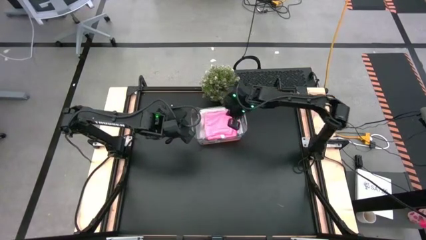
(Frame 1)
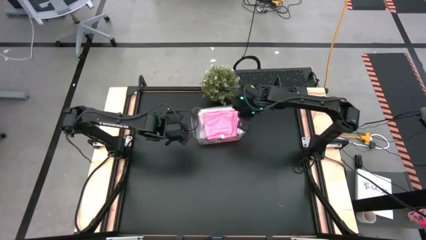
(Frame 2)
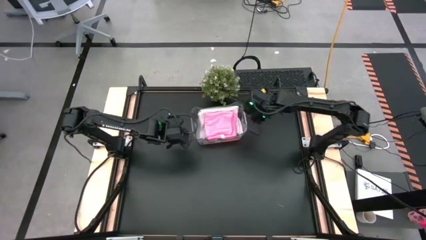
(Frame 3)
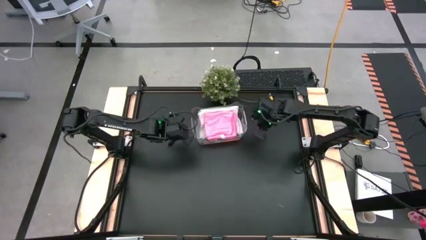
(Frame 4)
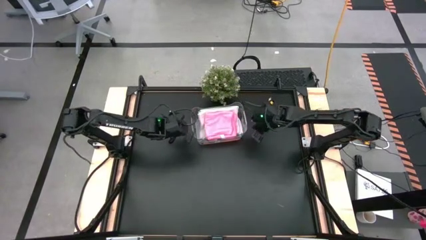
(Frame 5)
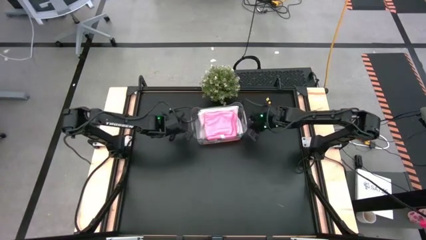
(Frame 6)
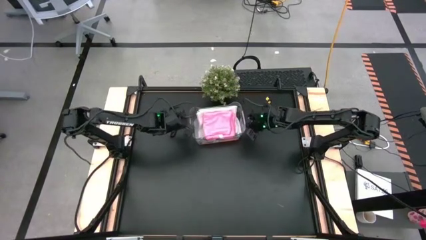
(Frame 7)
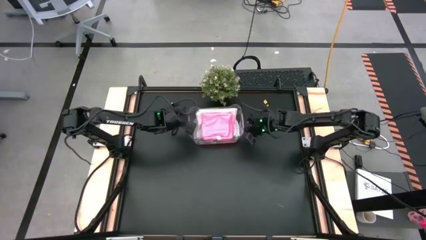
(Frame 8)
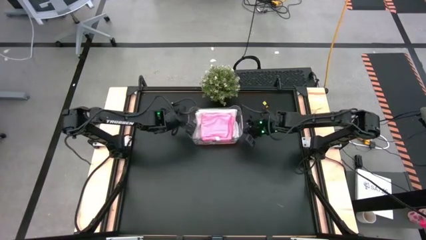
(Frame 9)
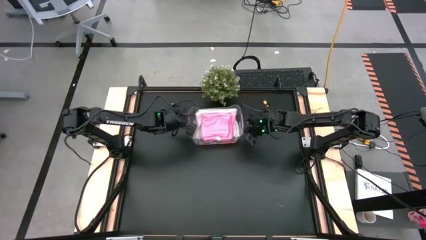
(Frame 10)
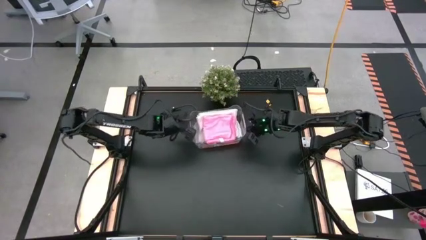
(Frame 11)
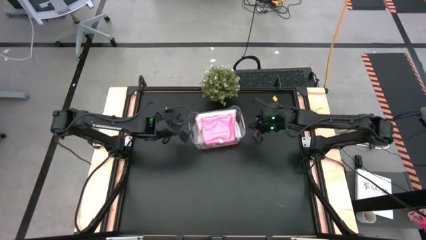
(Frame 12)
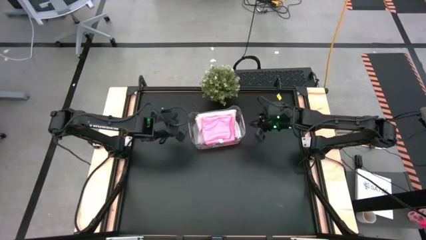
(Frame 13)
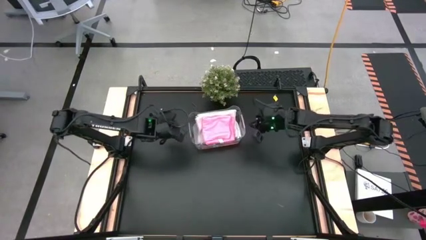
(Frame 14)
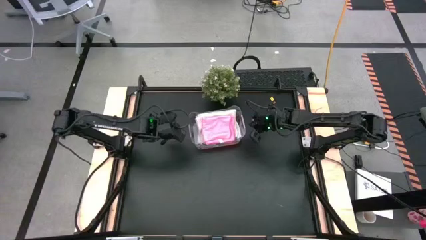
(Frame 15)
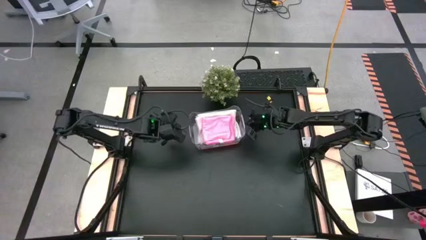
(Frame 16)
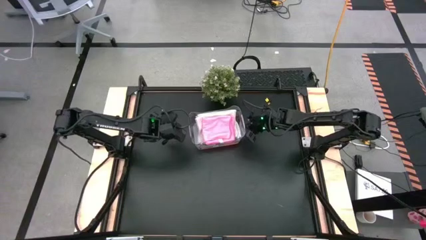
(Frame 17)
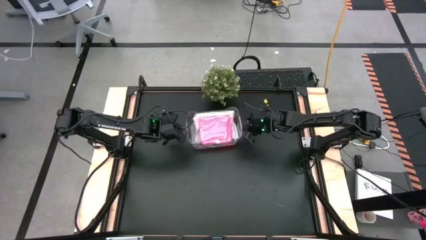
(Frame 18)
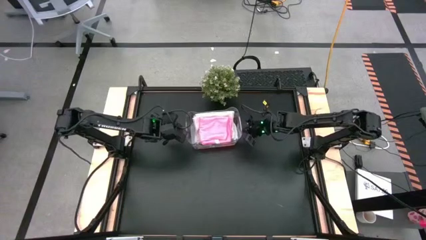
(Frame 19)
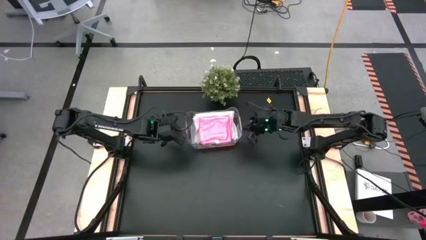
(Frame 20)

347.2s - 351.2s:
Task: Fold microfiber towels
Adjust the transparent bin

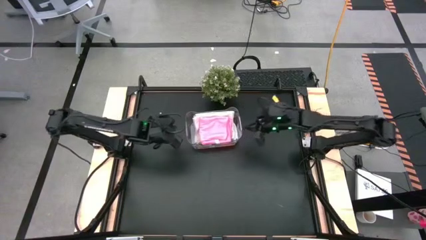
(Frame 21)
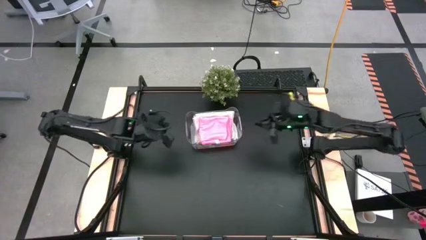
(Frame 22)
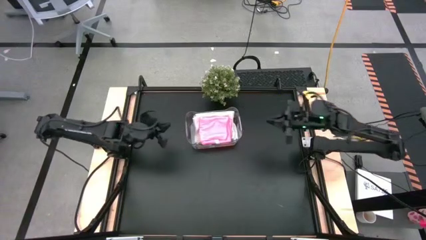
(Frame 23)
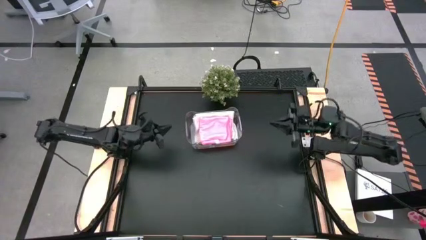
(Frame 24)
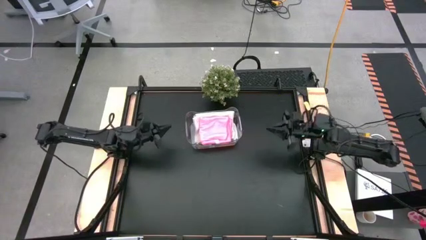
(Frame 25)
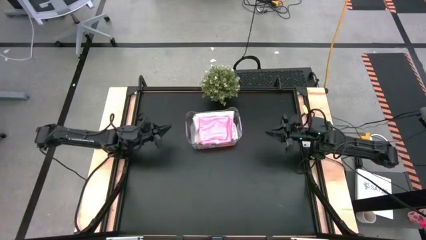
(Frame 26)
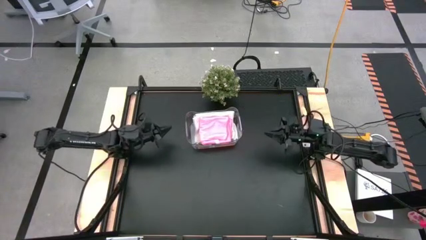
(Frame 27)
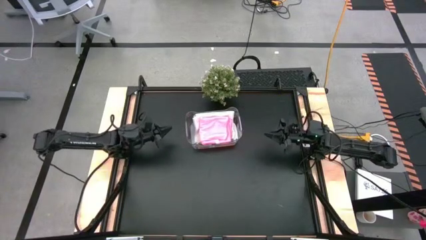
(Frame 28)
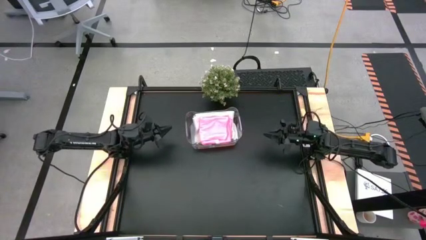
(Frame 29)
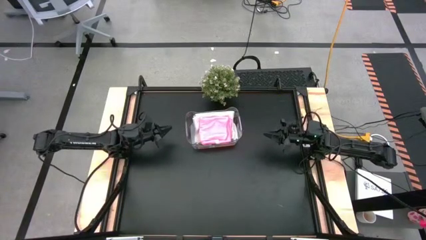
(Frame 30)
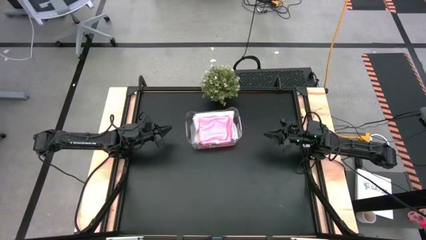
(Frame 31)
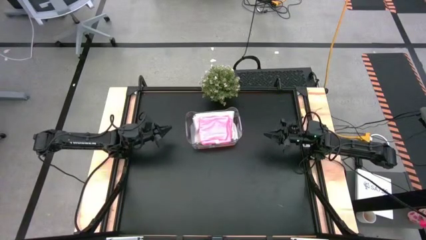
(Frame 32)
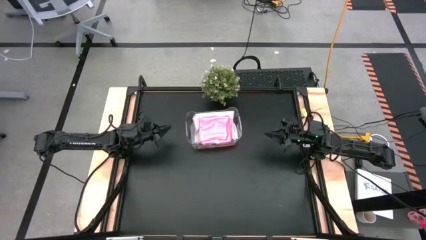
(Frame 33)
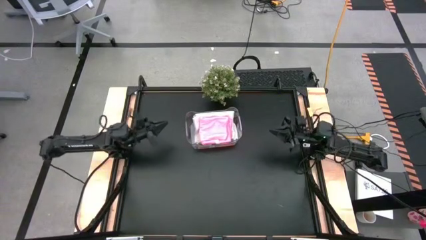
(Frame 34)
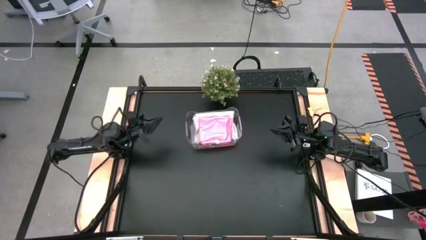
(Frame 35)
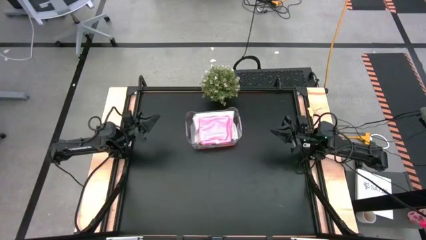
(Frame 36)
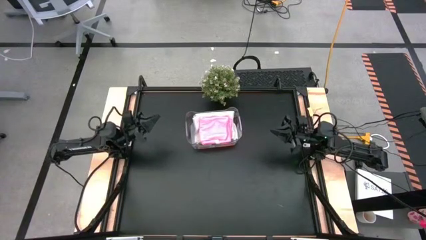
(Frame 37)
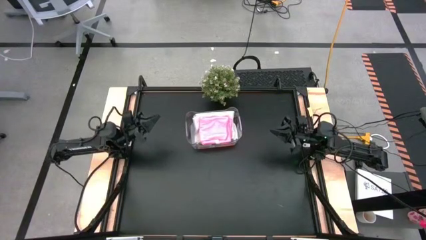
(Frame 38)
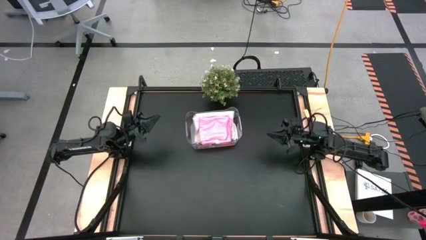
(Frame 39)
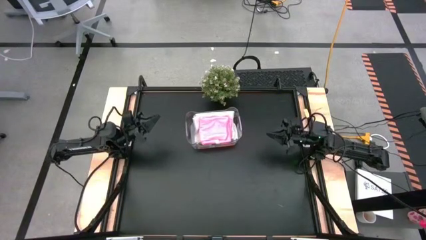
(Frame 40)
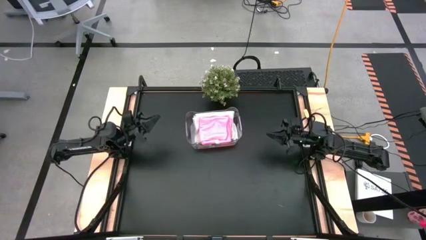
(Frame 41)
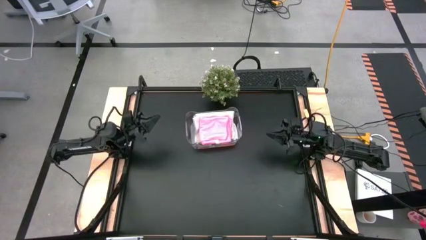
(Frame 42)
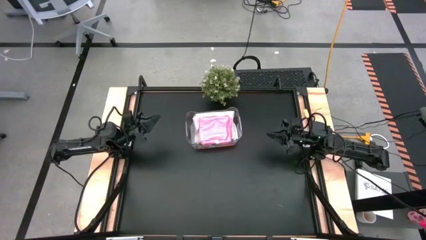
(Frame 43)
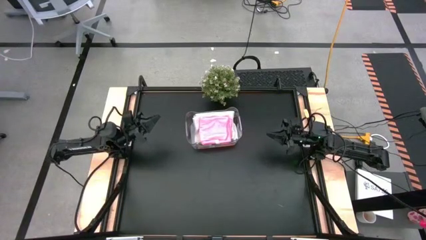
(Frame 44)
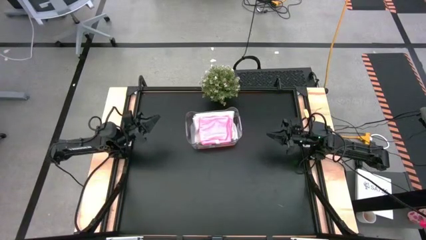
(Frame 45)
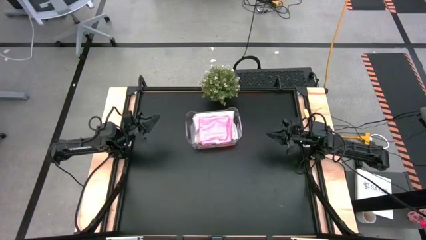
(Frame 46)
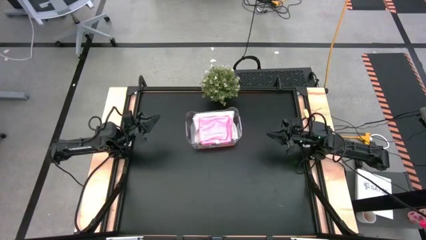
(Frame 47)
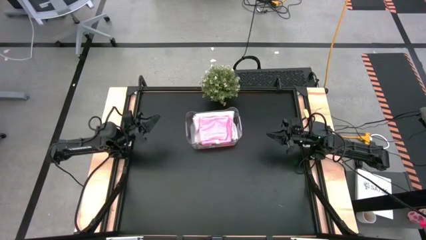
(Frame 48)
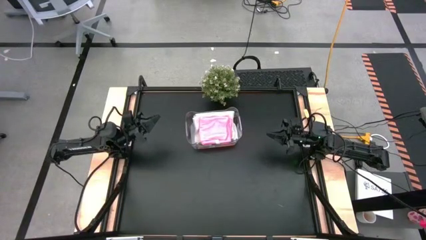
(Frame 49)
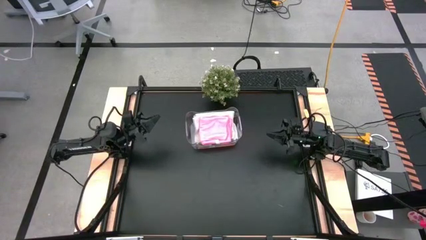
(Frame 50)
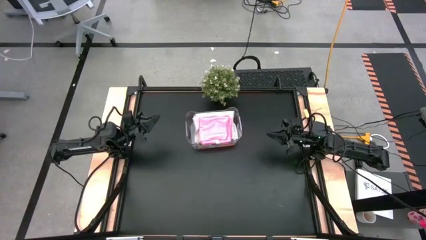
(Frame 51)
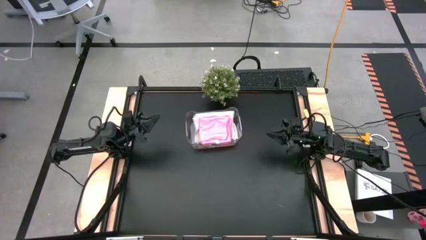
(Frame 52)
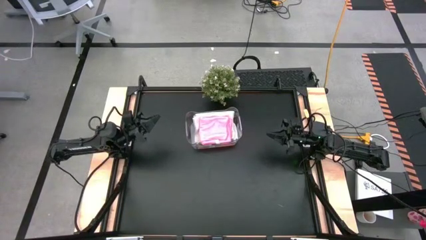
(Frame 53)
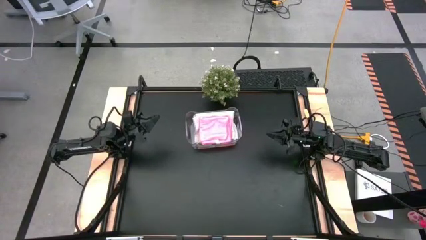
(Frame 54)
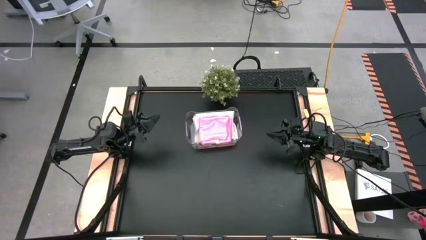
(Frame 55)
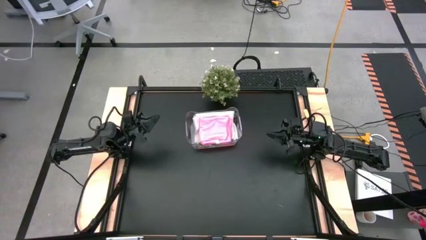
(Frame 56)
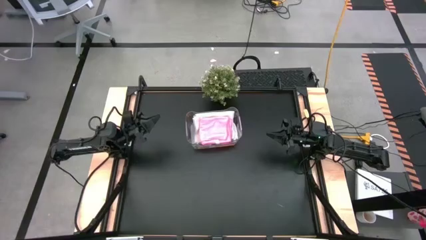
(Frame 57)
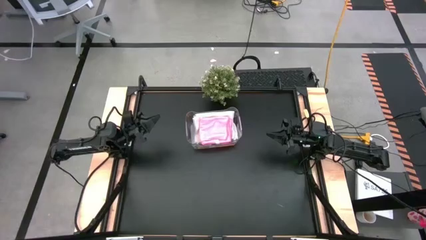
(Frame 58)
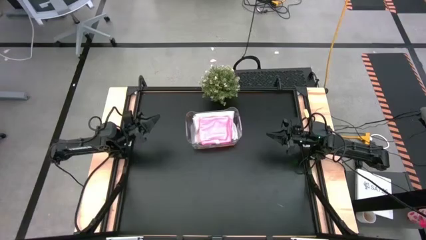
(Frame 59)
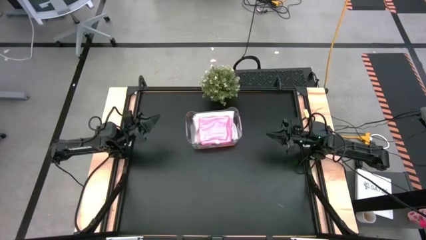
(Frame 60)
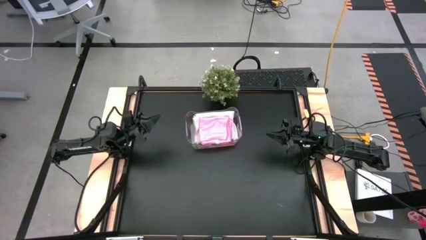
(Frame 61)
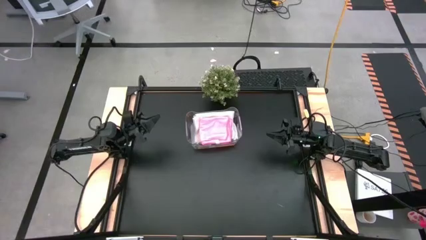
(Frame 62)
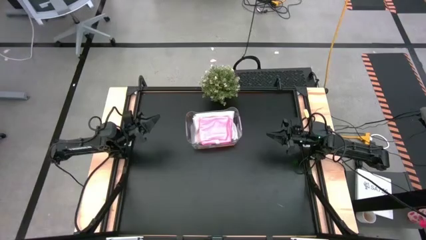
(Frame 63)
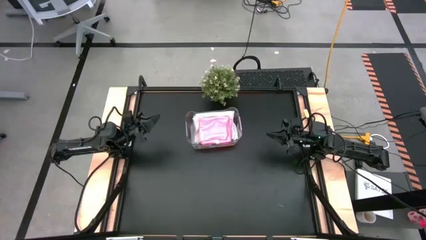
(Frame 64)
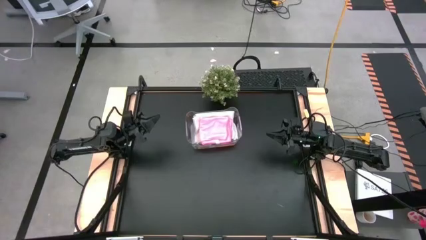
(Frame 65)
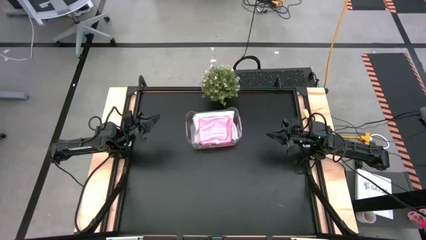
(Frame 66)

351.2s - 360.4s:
Return to Home Position
